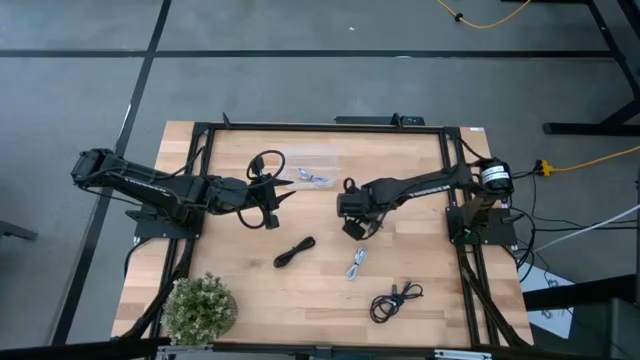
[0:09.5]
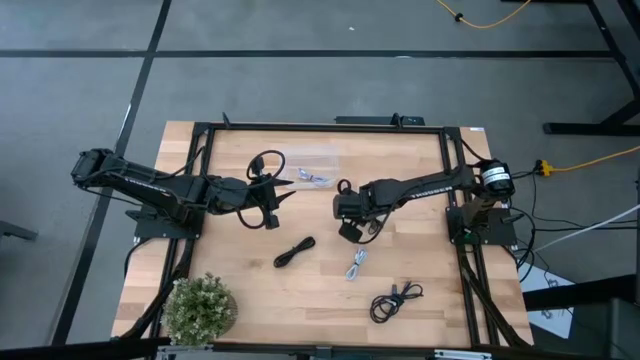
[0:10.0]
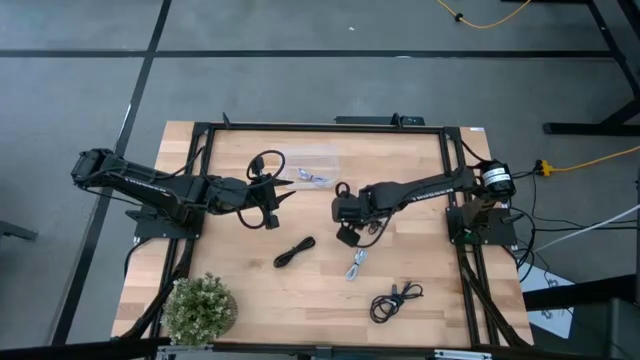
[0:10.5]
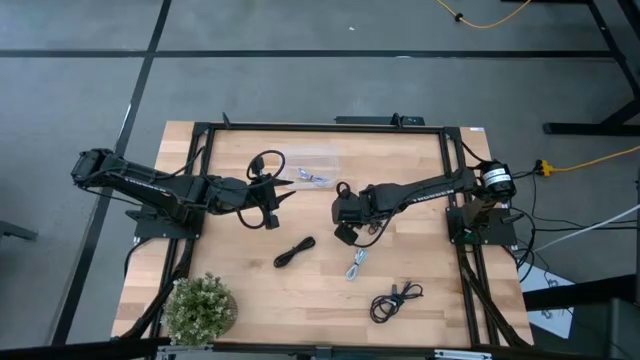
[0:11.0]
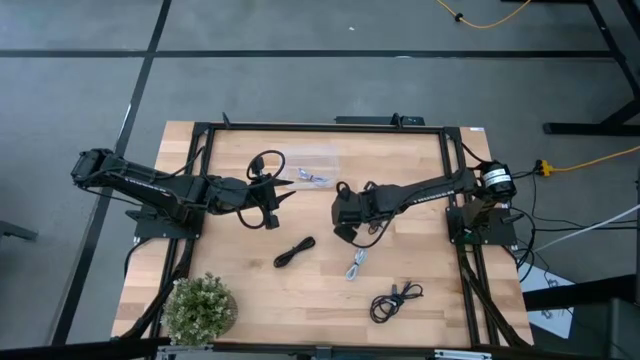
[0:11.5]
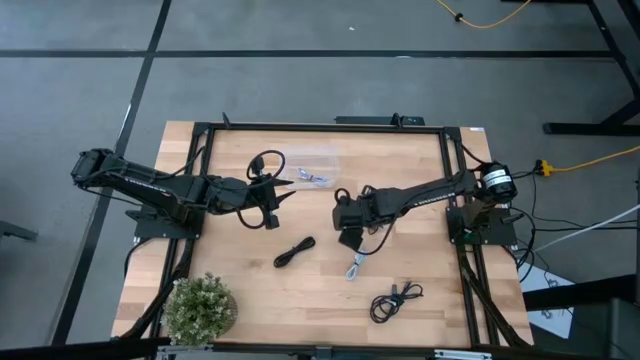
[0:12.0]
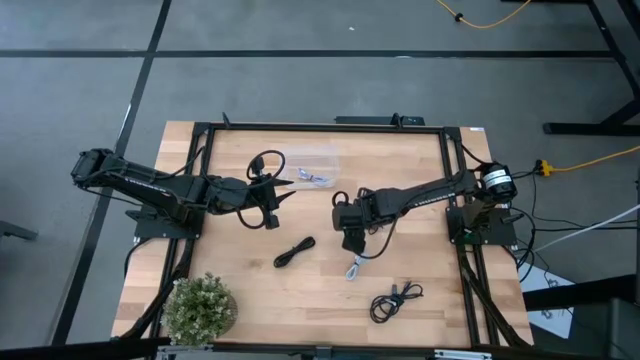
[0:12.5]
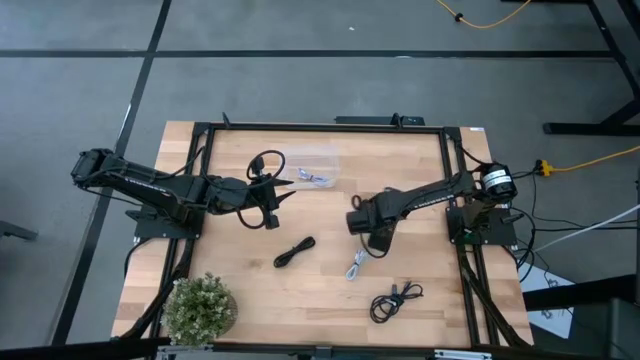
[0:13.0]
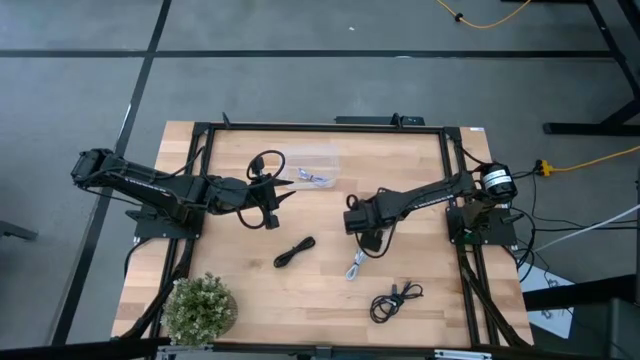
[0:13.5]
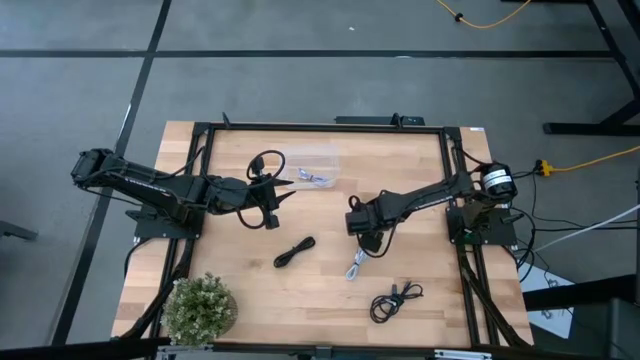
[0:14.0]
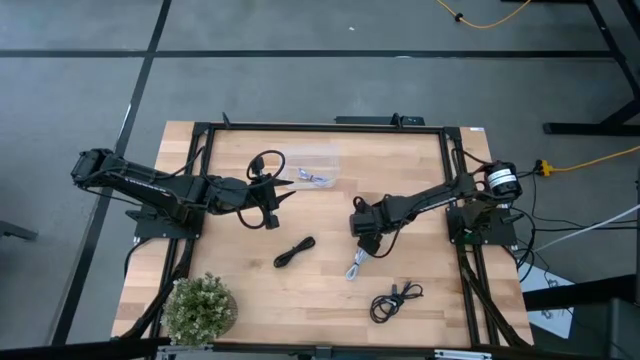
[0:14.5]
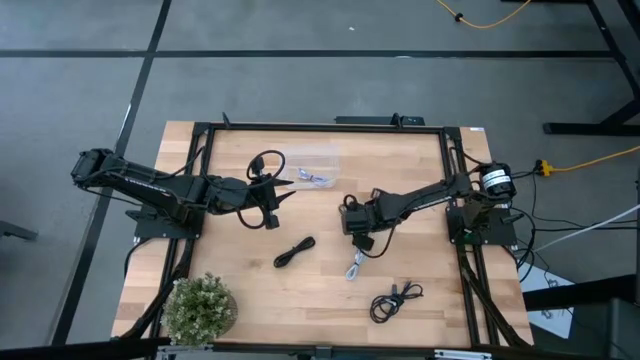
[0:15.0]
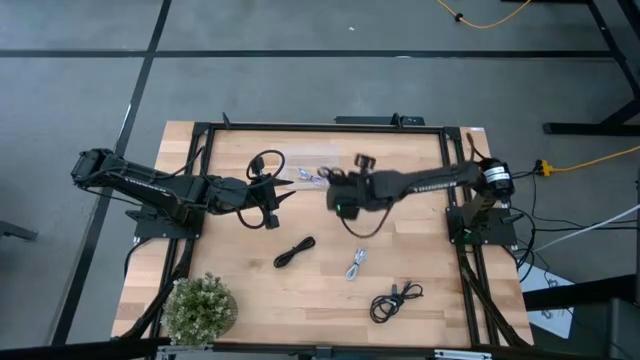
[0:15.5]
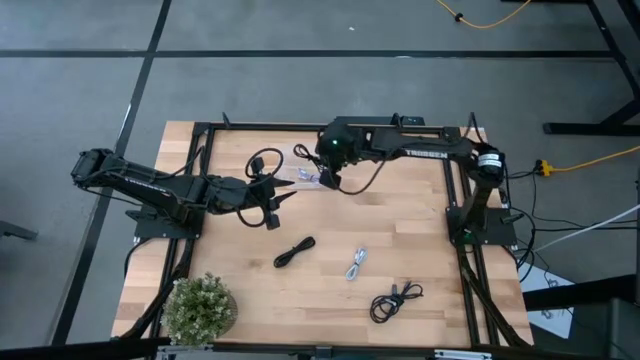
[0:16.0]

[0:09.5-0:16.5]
Task: Pick and place USB-C Cables
Put the top right black charger cable into the transparent bin

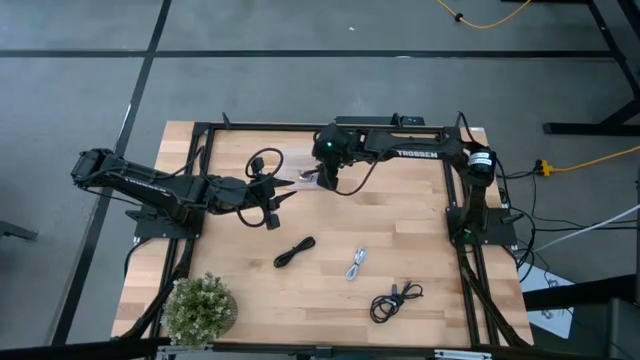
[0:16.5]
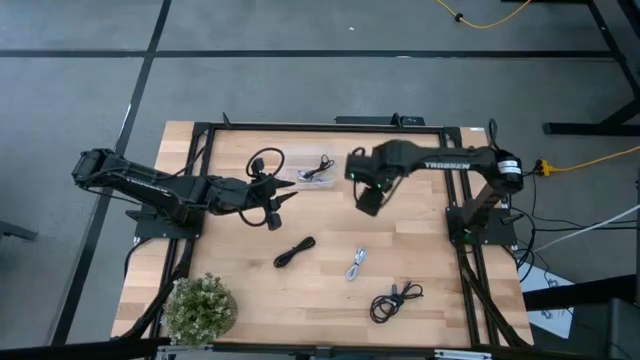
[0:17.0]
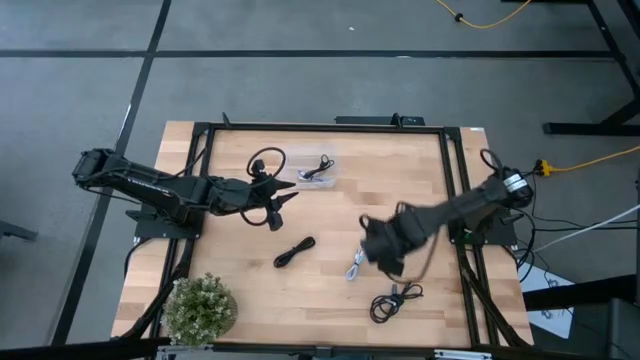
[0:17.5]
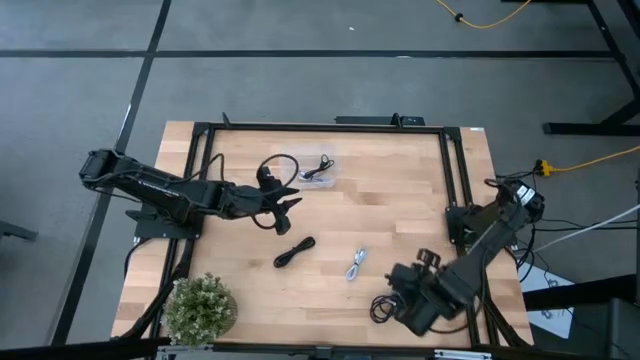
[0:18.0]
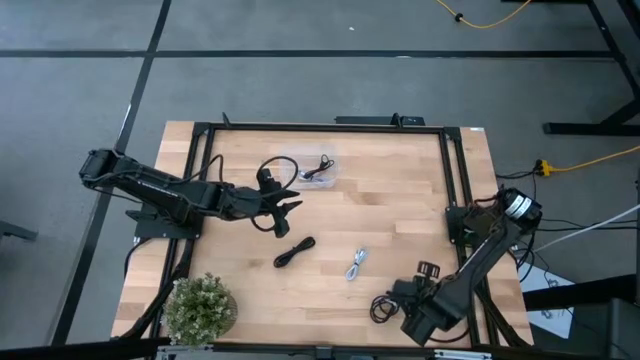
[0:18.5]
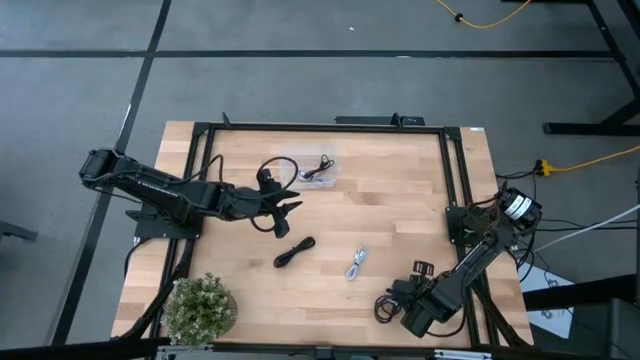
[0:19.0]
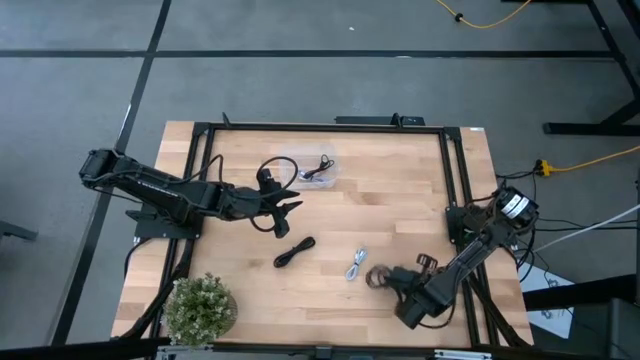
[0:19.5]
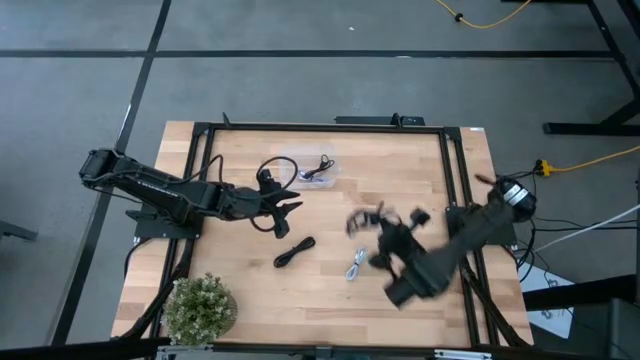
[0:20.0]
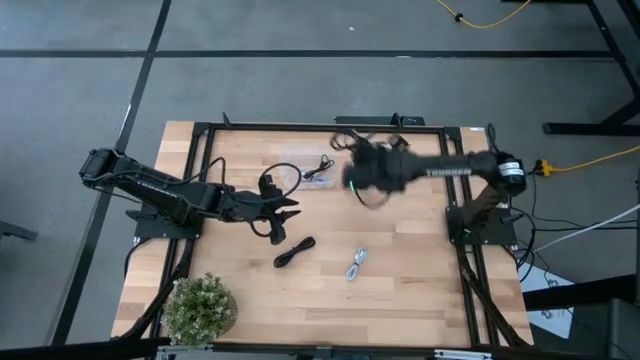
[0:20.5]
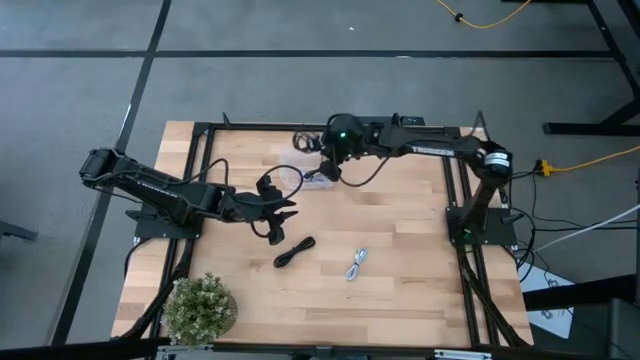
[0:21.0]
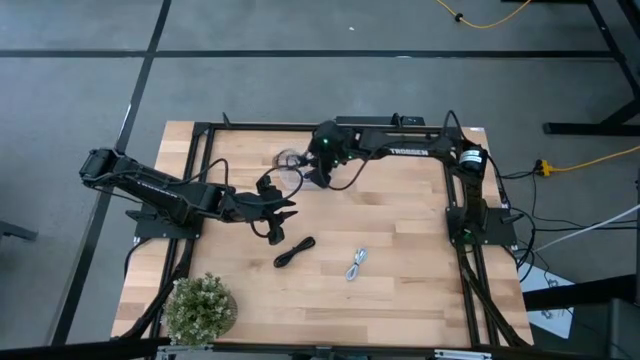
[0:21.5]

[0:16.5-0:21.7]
Put the right black charger cable into the transparent bin

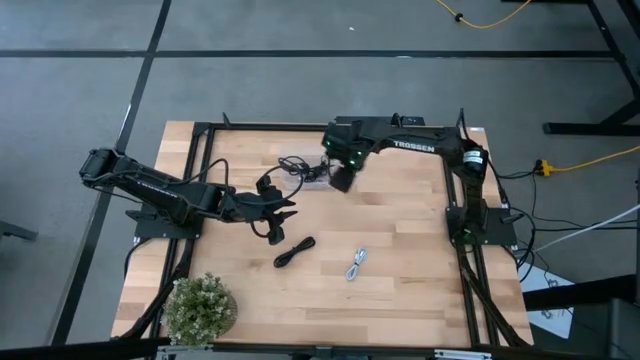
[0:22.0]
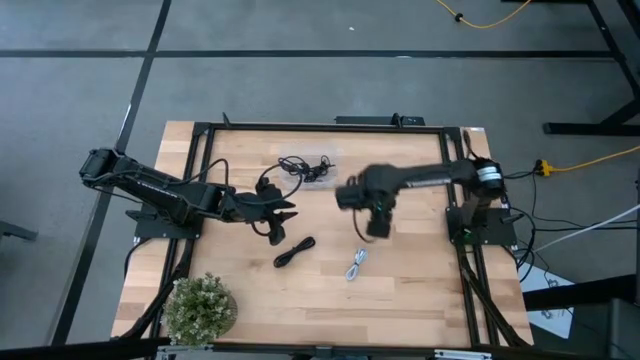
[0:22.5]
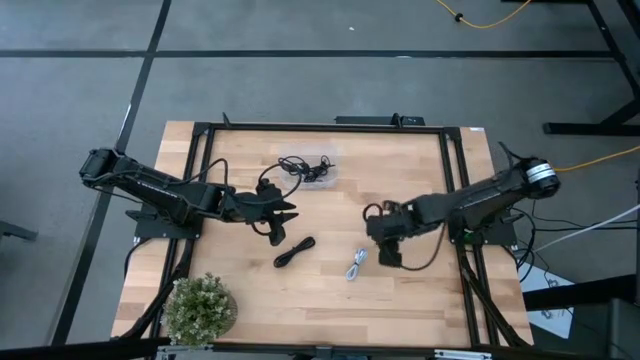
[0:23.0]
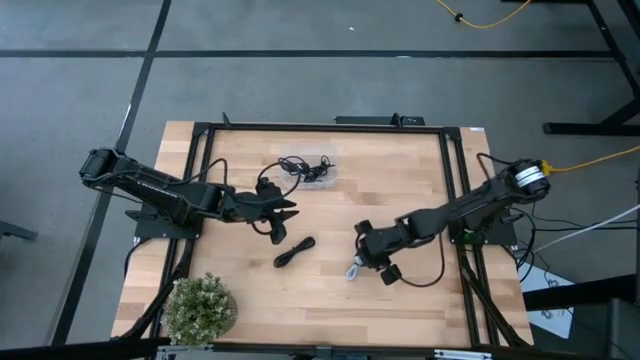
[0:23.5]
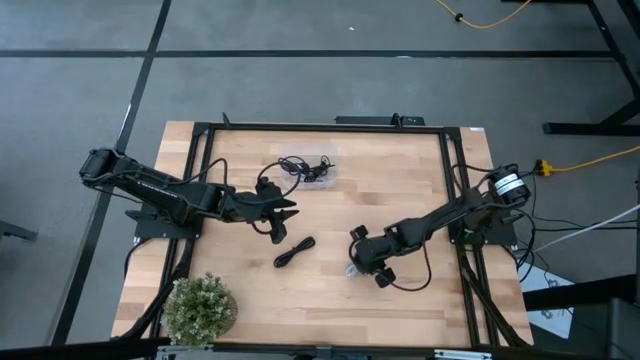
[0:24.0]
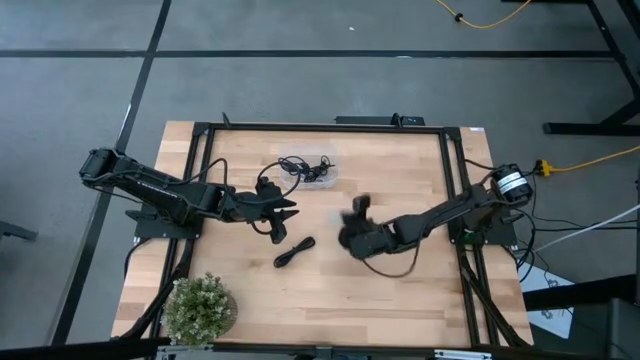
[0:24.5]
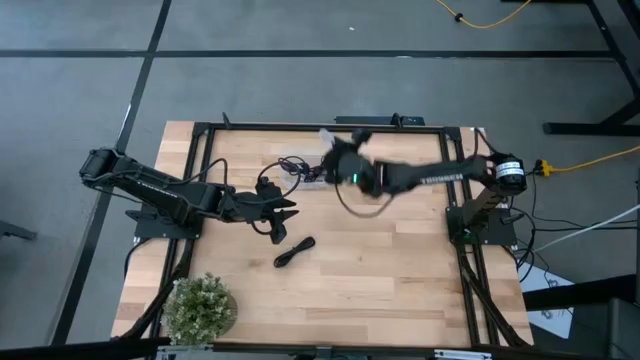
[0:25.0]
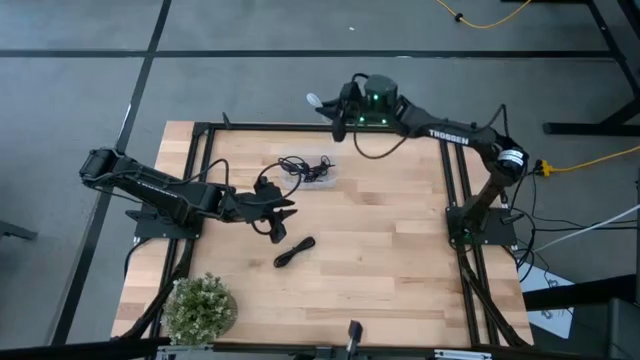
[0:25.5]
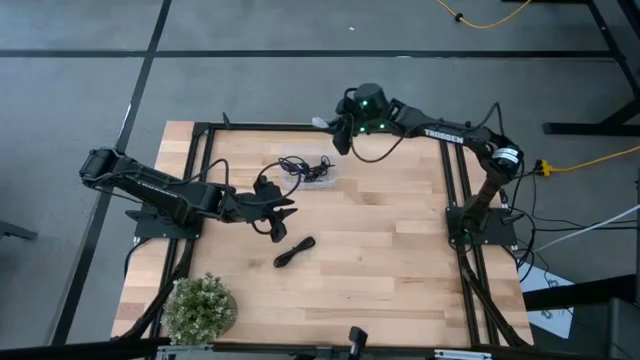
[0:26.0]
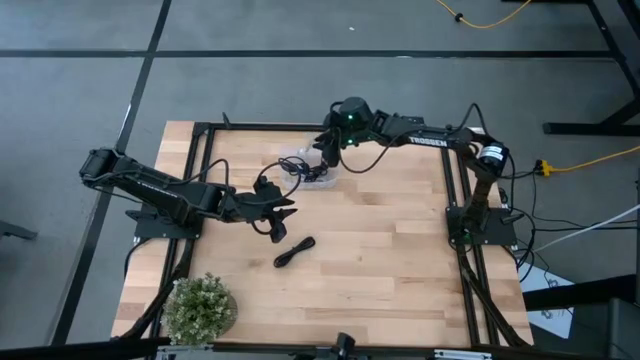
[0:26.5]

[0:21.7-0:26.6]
Put the white charger cable into the transparent bin

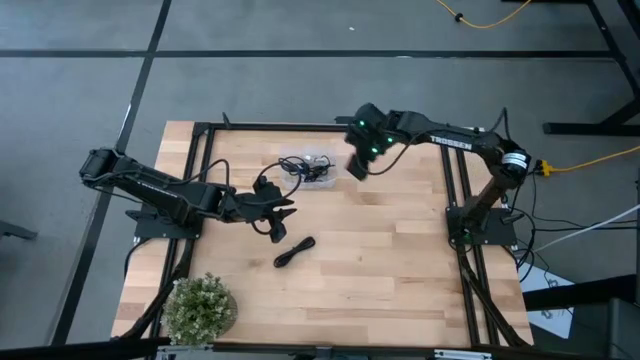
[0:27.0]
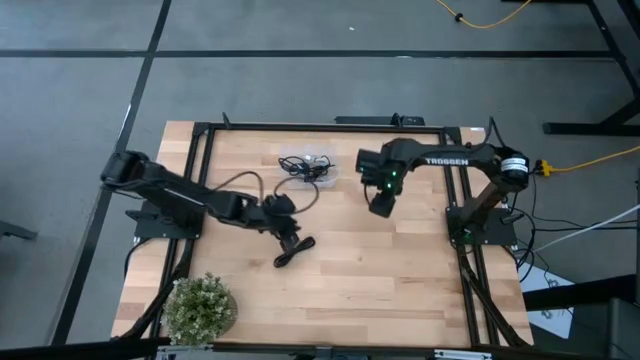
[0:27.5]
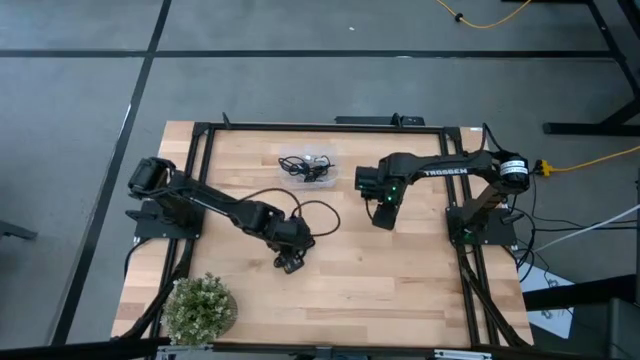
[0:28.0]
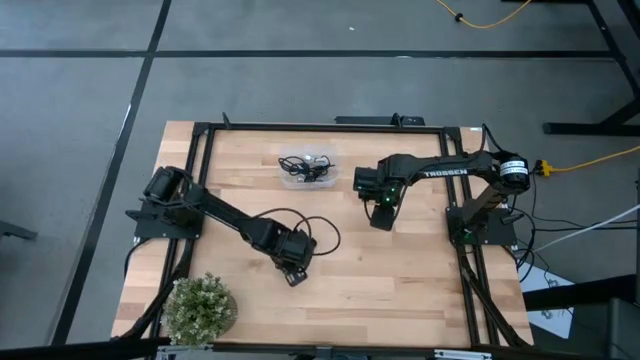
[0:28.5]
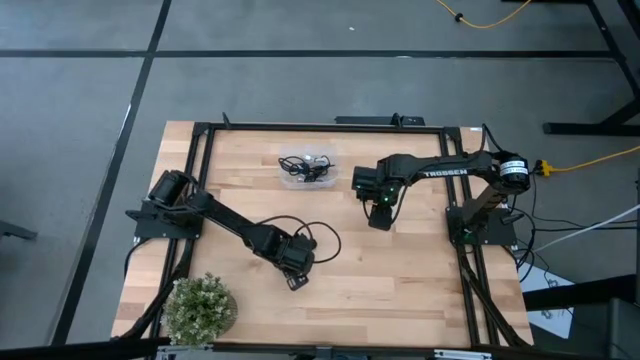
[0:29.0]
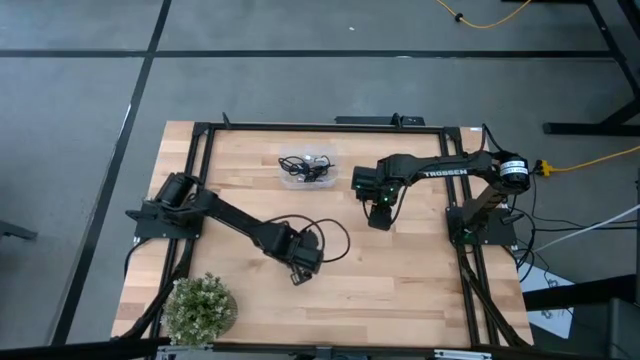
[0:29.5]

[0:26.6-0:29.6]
Put the black charger cable into the transparent bin
